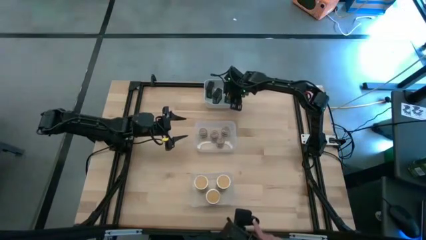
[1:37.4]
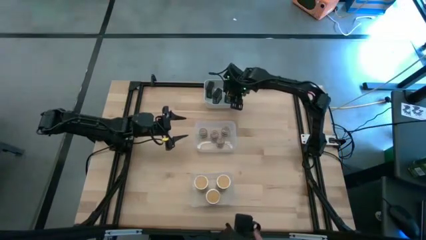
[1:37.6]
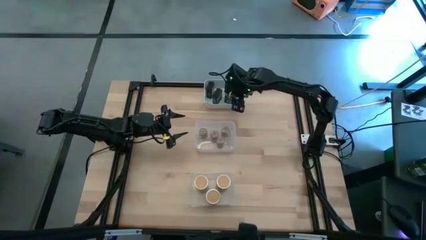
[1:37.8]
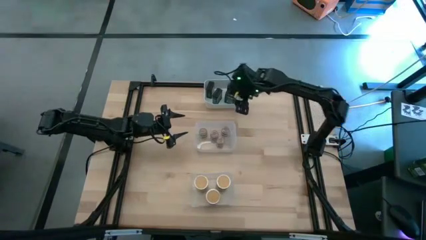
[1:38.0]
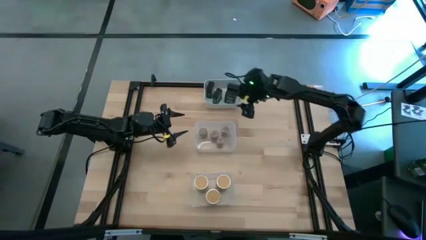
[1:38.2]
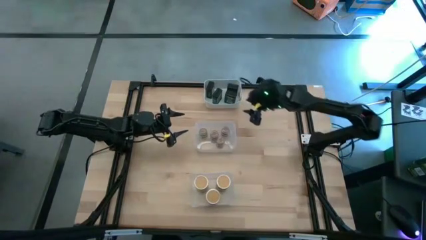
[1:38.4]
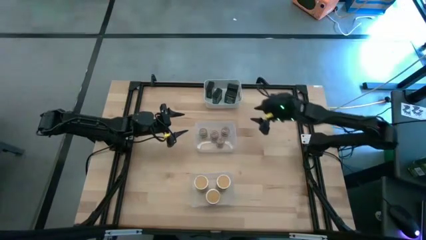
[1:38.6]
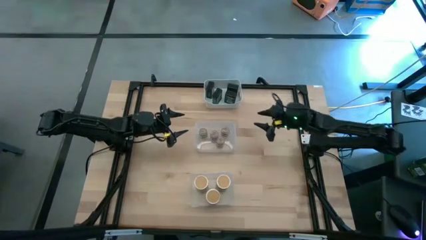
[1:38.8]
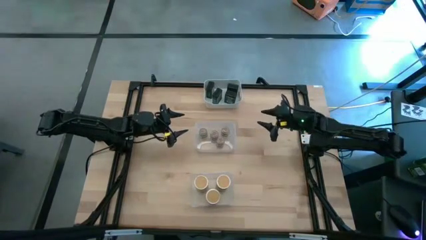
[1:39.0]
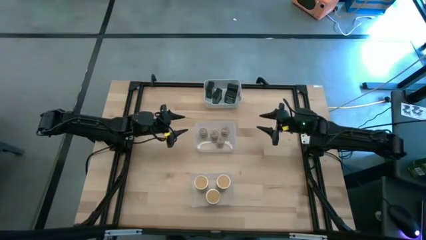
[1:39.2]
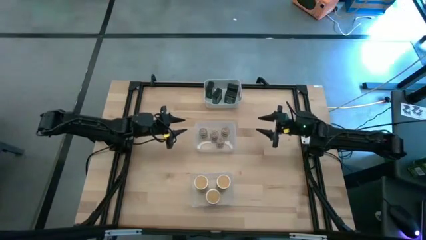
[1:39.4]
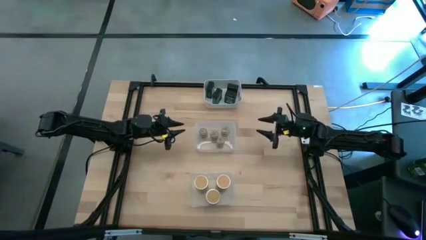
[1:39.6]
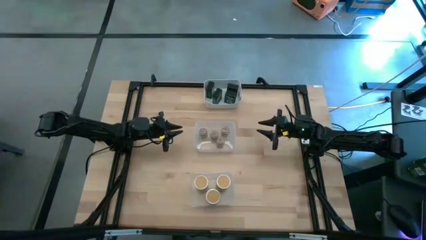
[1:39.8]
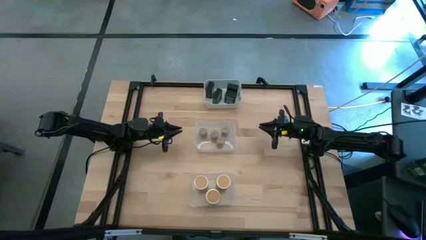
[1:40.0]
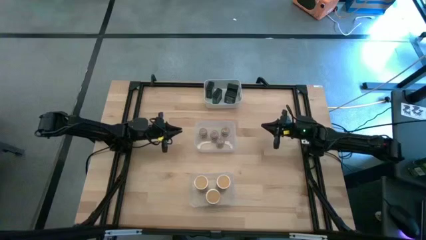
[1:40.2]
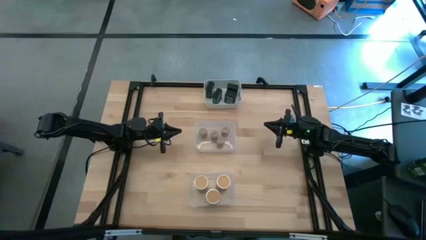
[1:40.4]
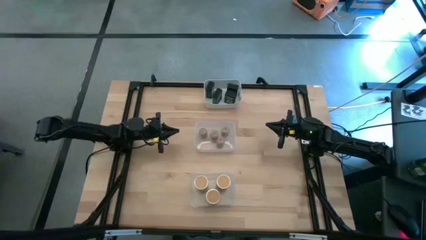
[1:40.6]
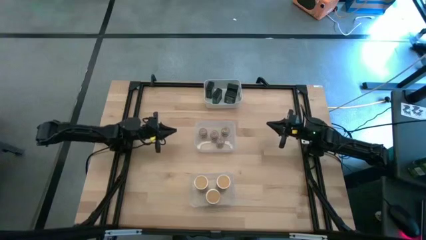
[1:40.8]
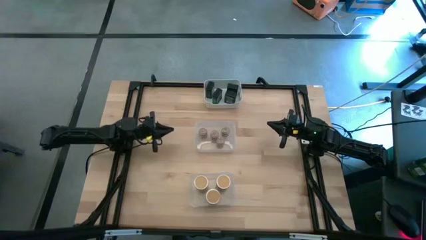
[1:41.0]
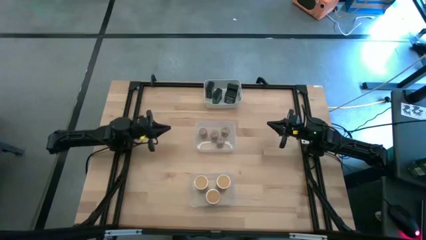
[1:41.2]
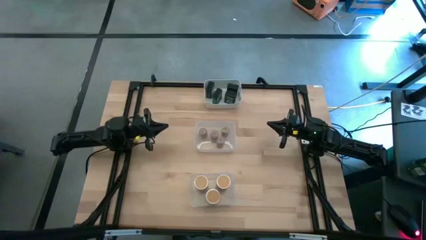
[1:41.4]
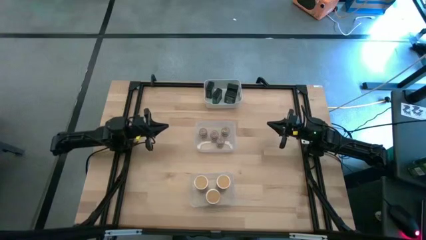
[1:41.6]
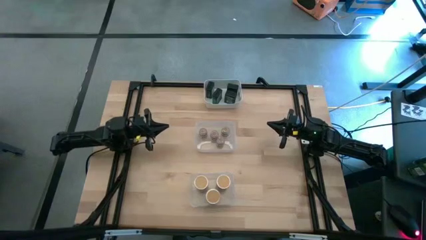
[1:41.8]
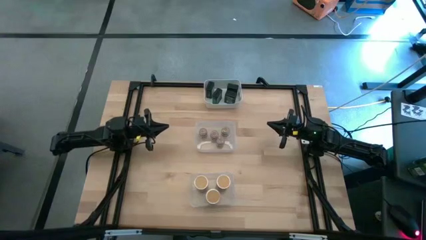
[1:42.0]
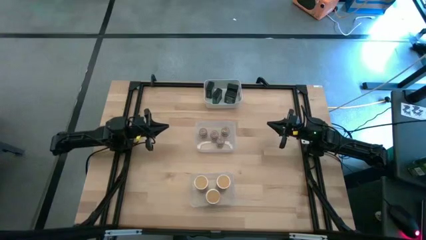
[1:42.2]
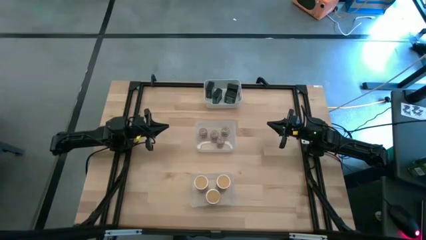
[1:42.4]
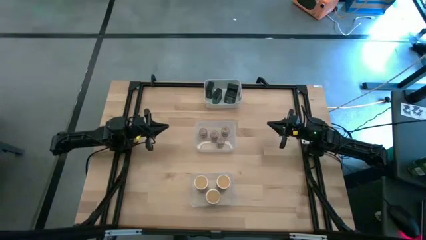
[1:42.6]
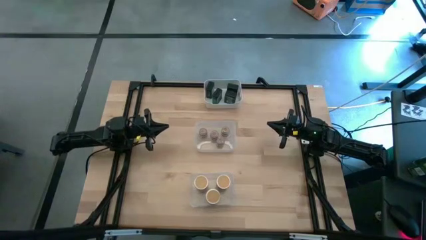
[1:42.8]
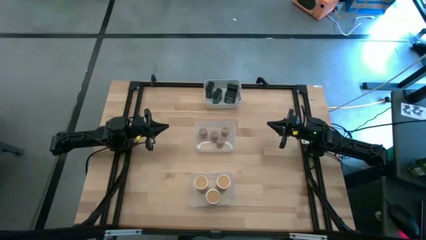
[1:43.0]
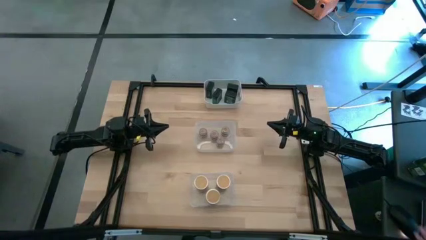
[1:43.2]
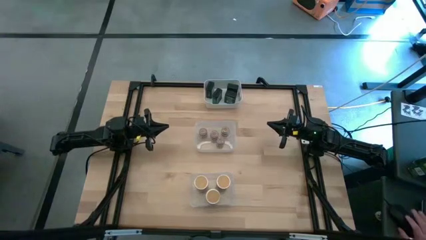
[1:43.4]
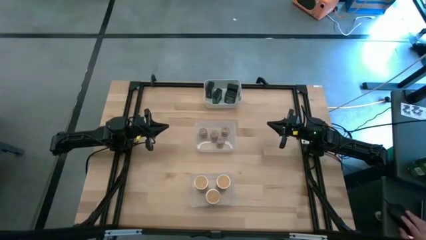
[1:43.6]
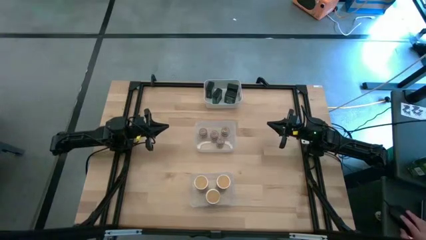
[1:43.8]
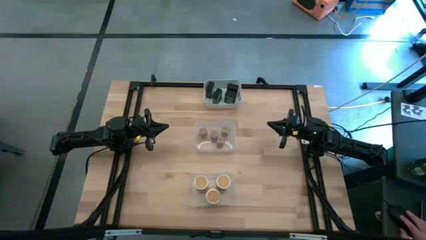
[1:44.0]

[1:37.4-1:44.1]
Task: Sort spices by type
Return to Home Position

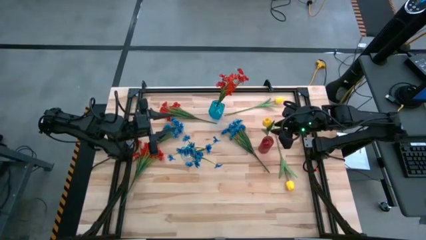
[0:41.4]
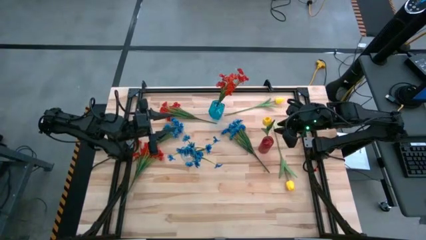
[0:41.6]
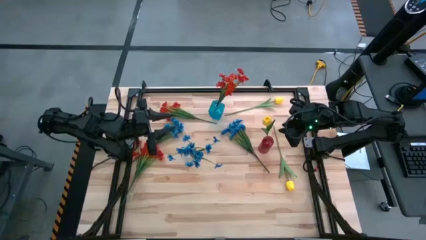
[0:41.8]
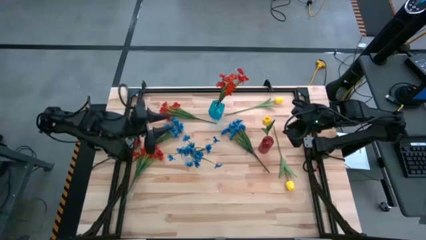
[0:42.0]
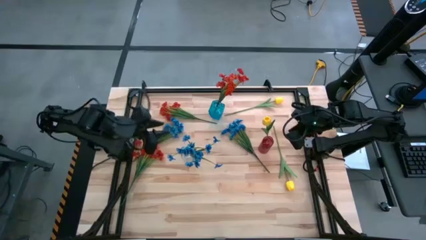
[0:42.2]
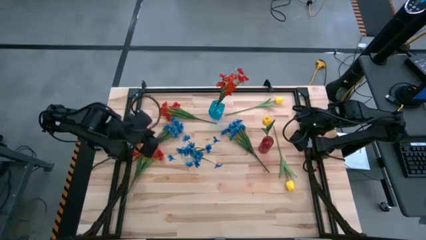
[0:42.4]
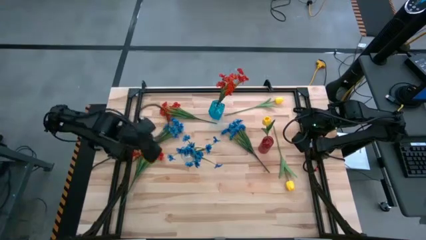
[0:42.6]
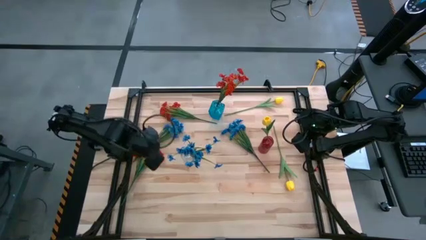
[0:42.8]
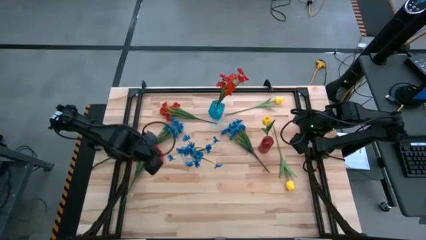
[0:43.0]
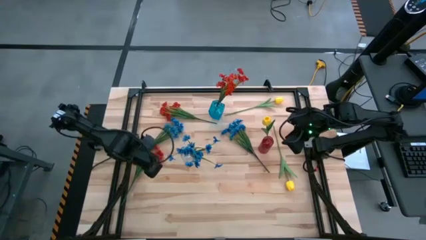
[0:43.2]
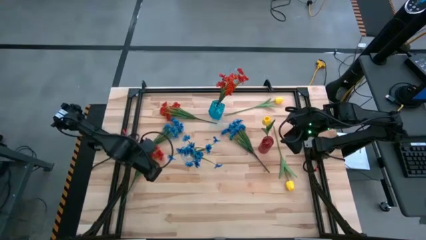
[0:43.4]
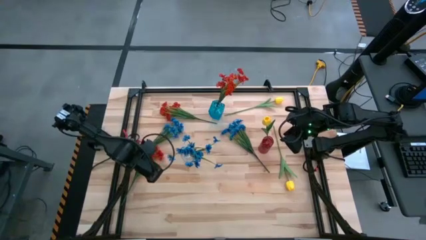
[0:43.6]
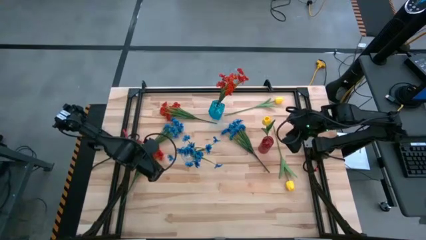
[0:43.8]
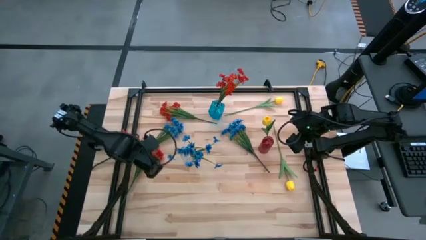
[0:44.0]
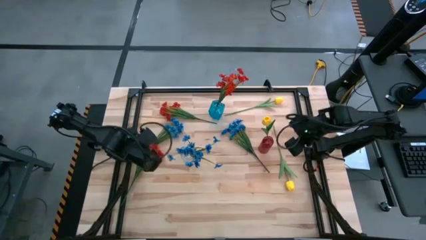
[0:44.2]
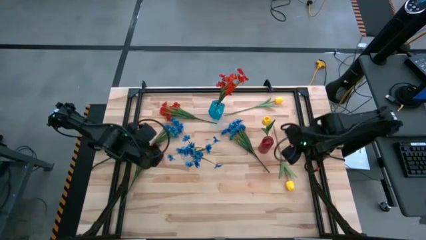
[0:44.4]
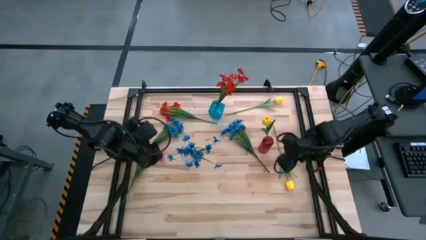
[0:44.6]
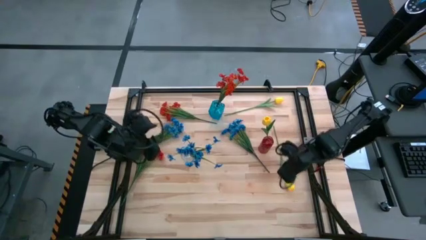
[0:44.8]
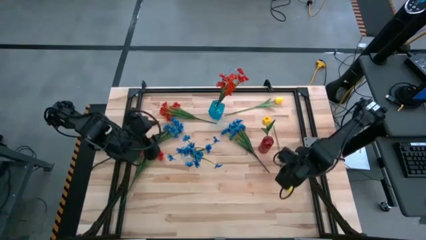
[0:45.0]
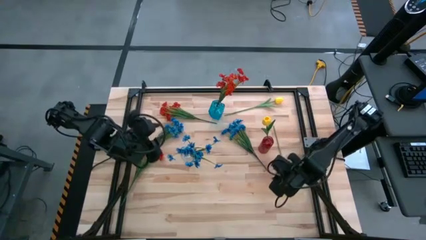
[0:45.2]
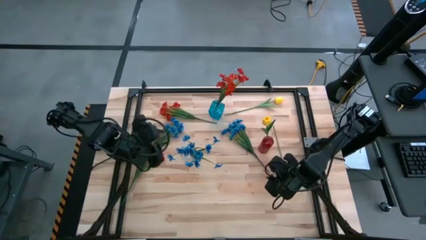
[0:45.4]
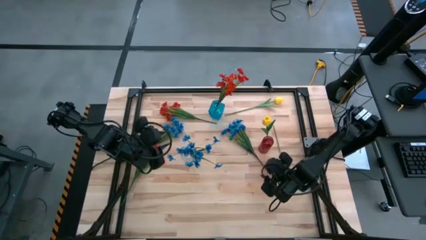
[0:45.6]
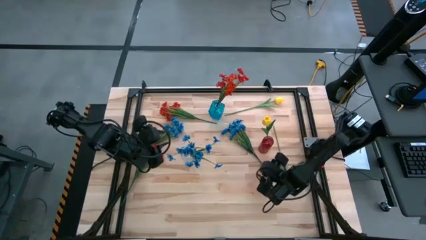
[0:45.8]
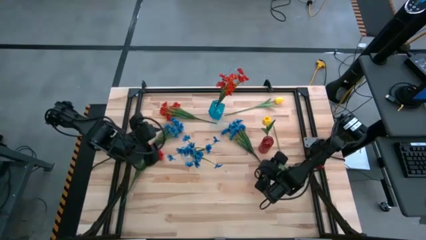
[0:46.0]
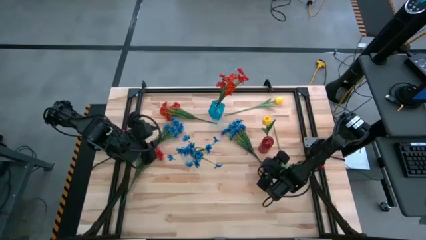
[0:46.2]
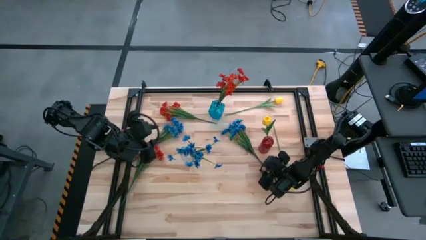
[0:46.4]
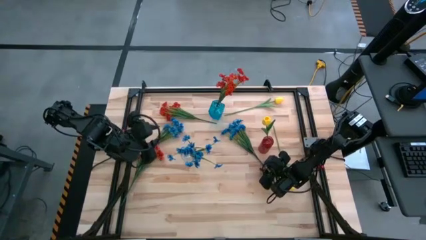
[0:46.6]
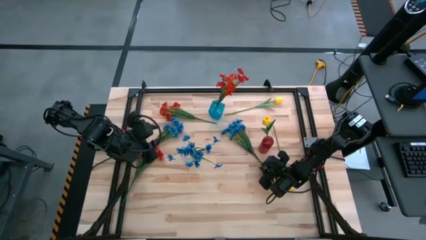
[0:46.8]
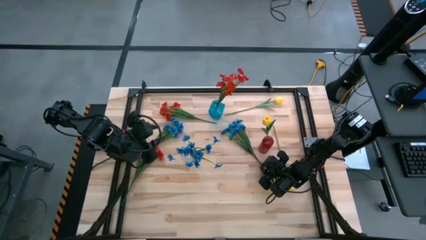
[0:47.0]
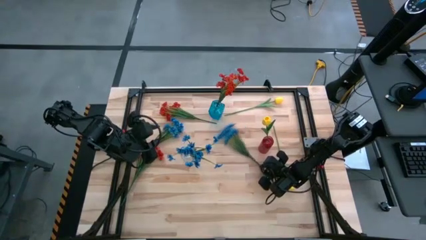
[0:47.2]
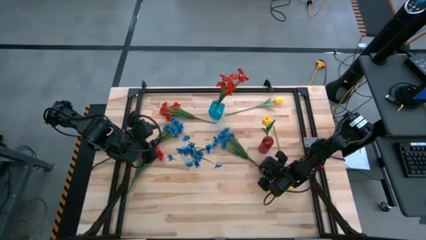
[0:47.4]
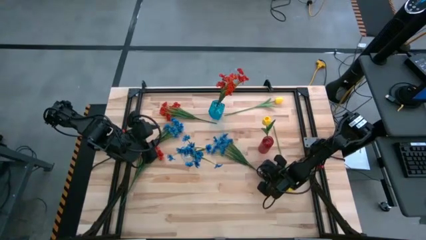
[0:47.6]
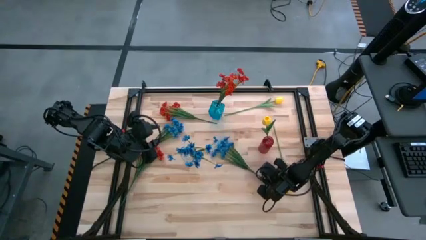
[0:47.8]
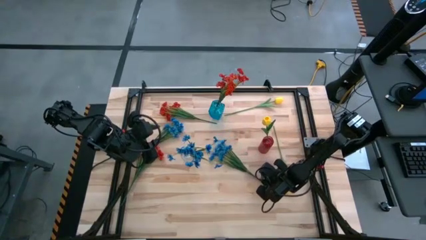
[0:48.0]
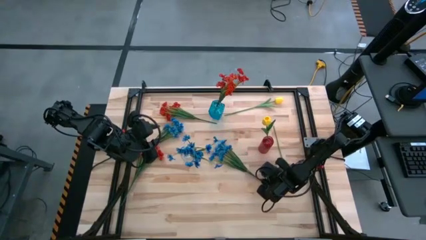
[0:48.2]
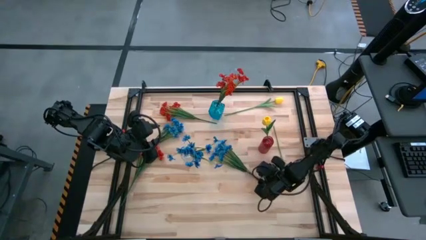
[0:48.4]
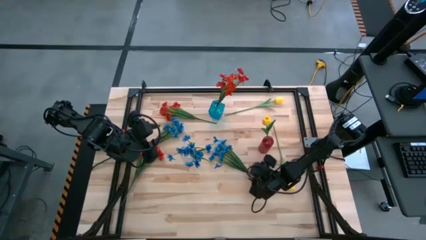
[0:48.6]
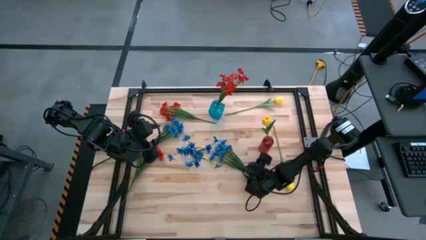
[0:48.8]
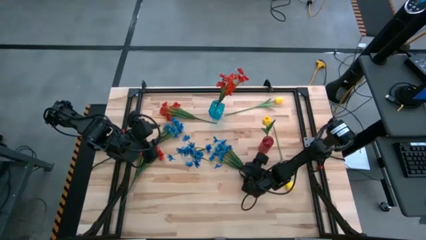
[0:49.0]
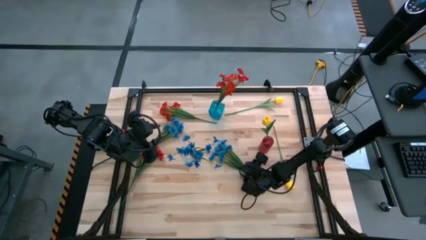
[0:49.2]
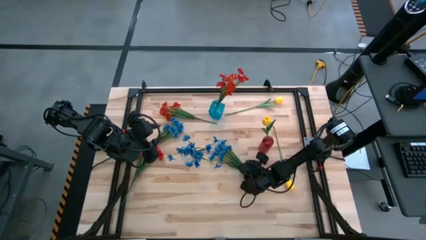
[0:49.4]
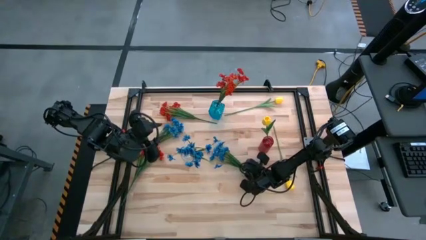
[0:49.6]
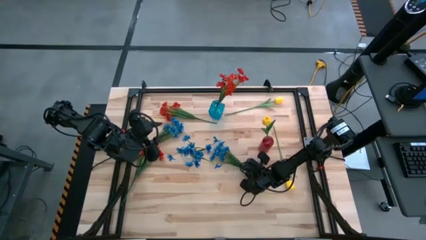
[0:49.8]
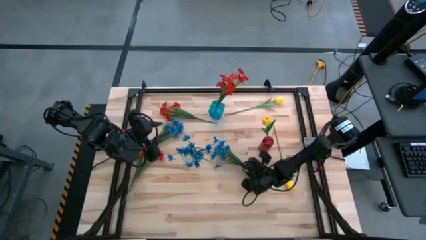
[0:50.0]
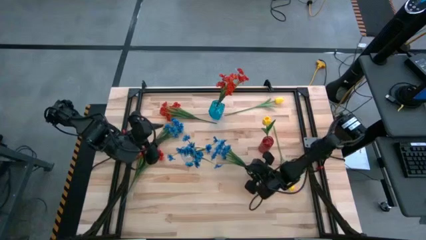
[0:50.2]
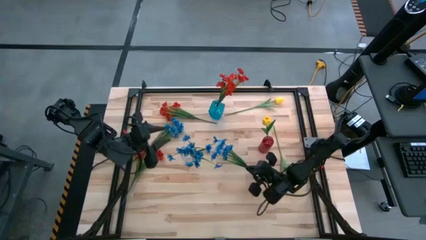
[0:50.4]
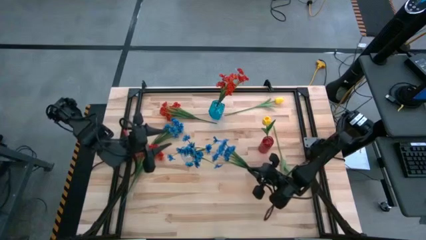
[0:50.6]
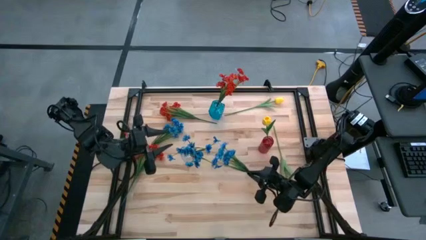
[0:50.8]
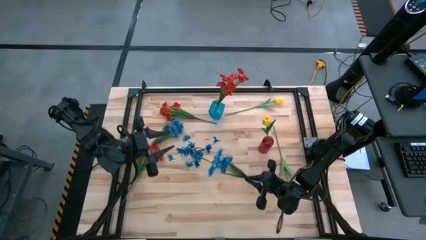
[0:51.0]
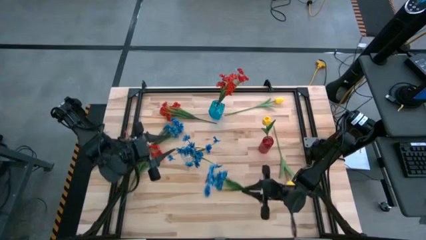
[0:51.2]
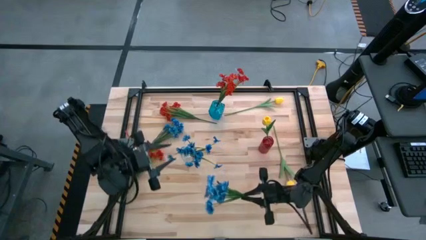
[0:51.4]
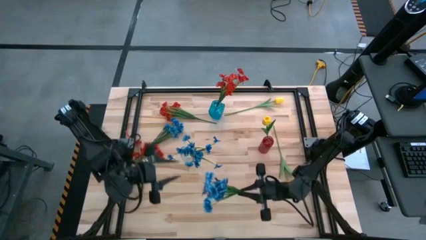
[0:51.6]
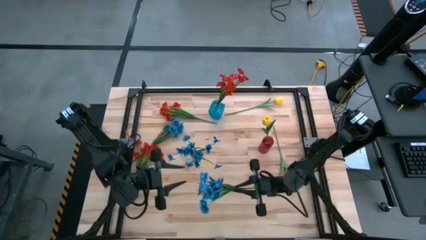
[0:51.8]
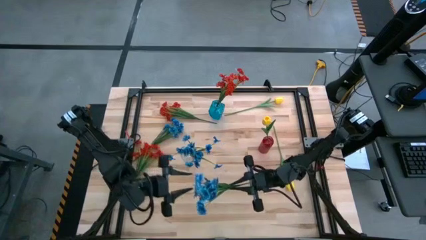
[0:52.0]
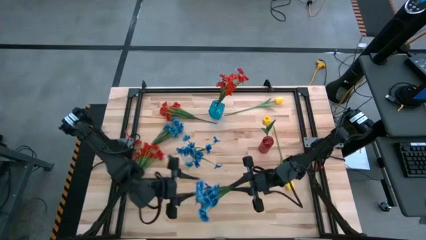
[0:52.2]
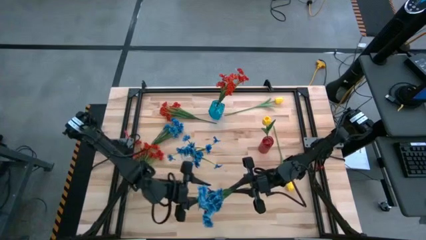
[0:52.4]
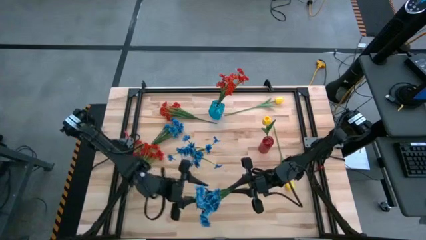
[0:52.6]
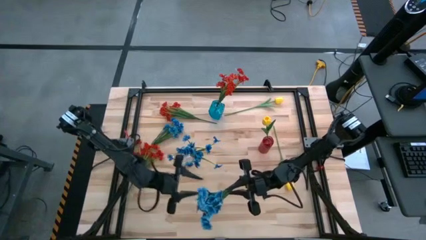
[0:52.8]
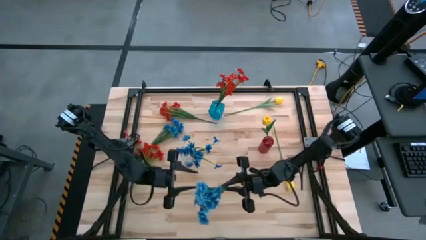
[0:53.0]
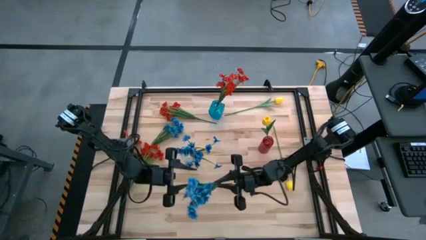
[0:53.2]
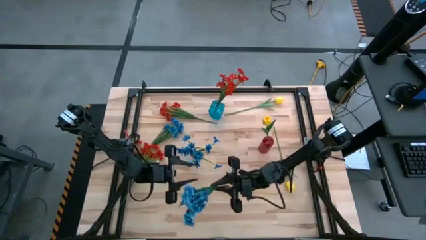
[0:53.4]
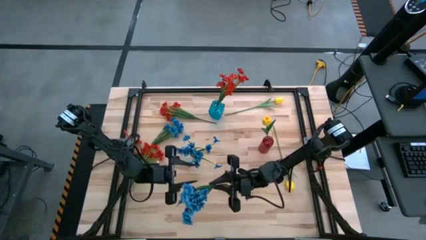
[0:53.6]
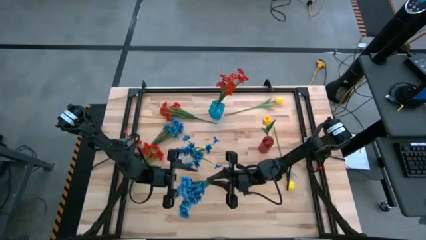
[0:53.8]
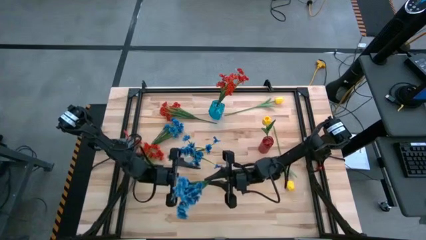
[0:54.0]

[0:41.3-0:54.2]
Task: Sort flowers into vase by color
Put the right blue flowers into the transparent vase
